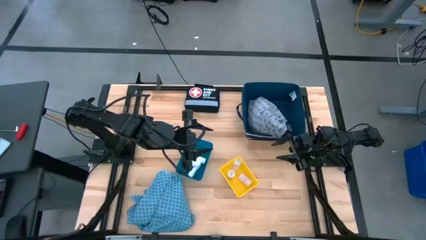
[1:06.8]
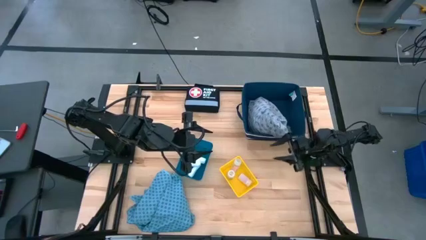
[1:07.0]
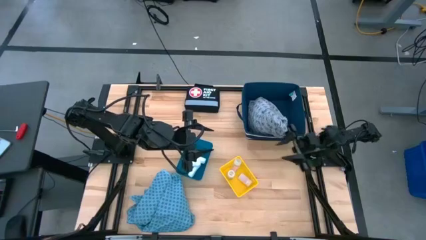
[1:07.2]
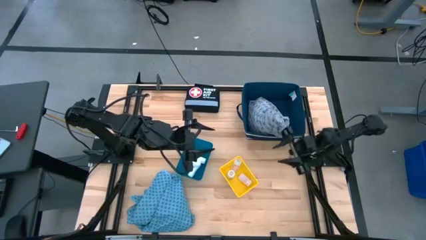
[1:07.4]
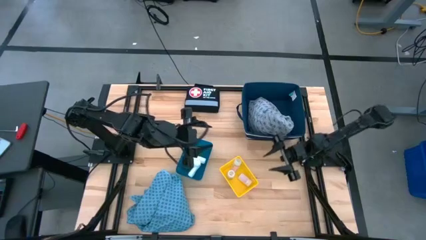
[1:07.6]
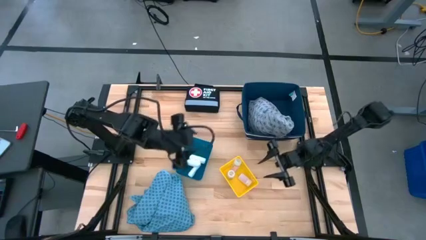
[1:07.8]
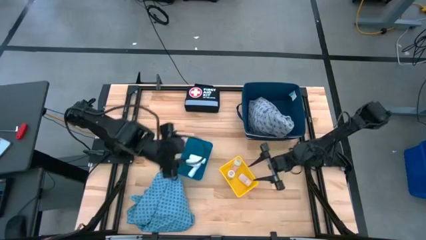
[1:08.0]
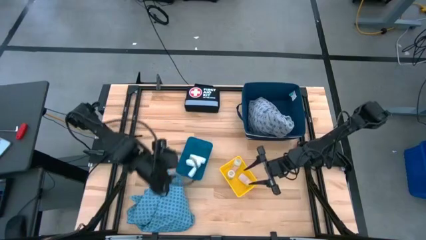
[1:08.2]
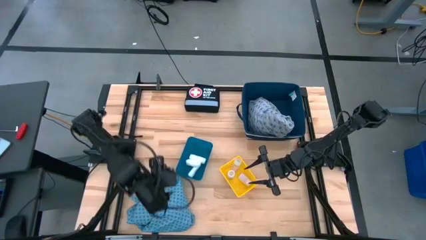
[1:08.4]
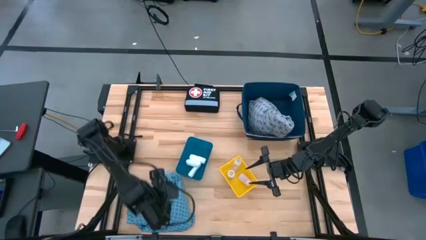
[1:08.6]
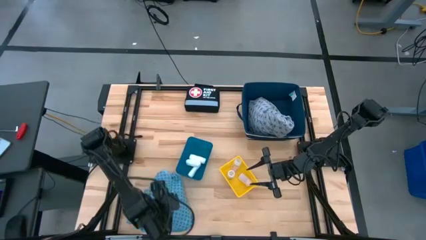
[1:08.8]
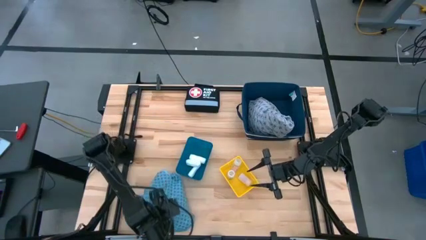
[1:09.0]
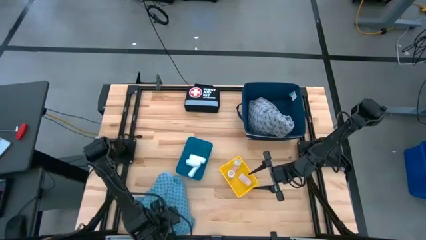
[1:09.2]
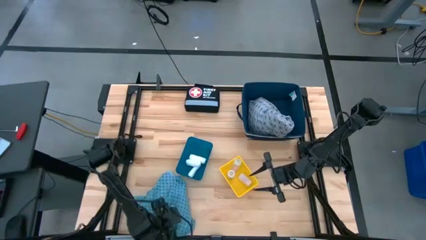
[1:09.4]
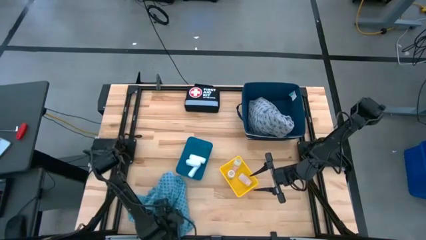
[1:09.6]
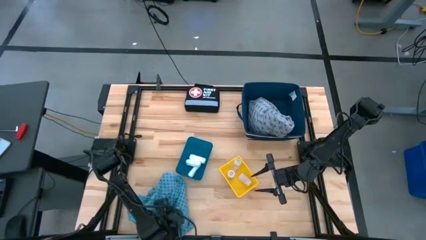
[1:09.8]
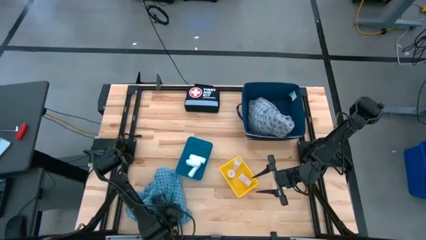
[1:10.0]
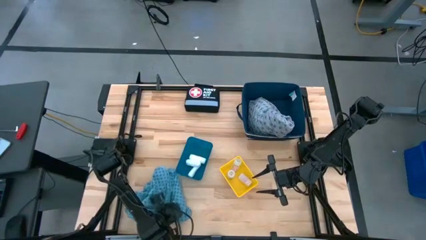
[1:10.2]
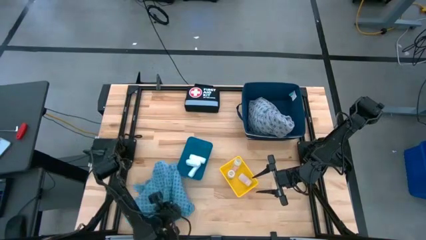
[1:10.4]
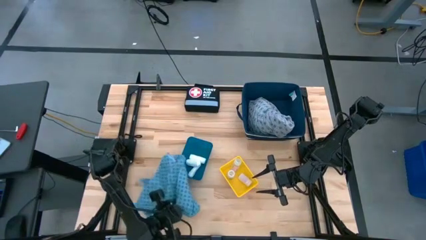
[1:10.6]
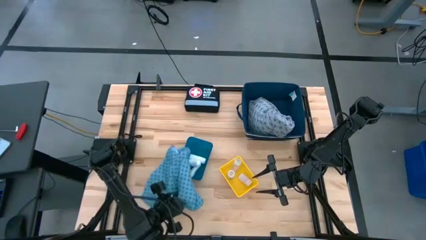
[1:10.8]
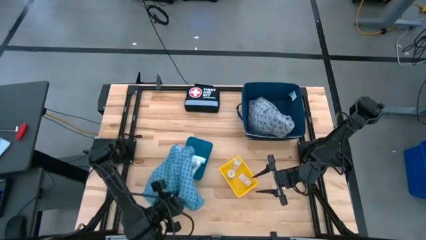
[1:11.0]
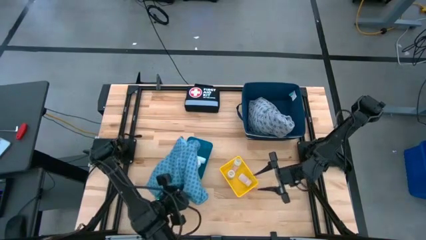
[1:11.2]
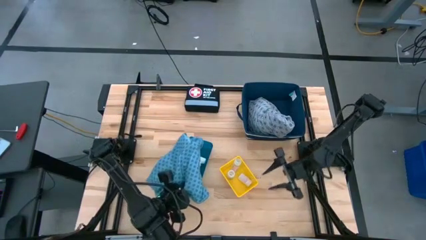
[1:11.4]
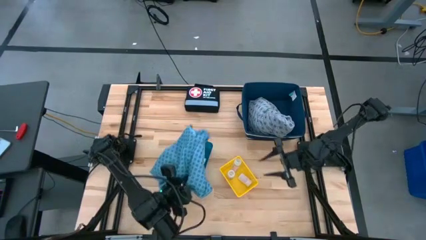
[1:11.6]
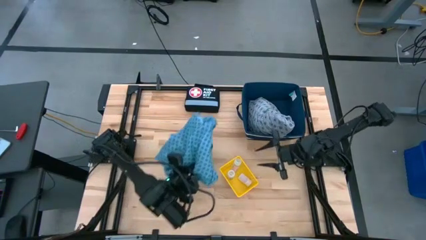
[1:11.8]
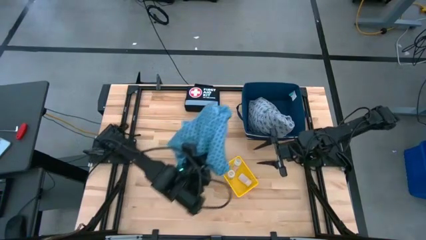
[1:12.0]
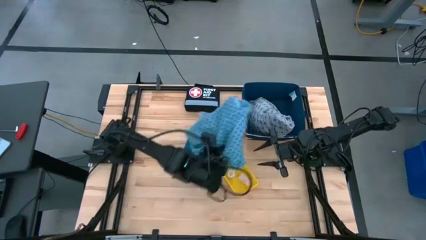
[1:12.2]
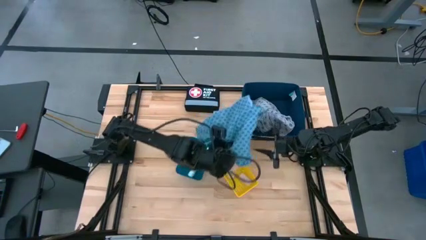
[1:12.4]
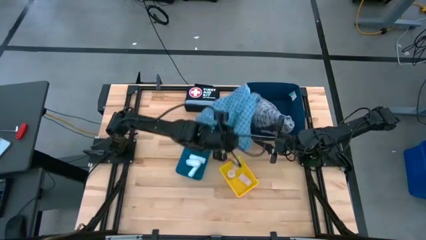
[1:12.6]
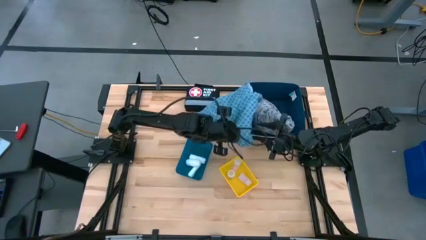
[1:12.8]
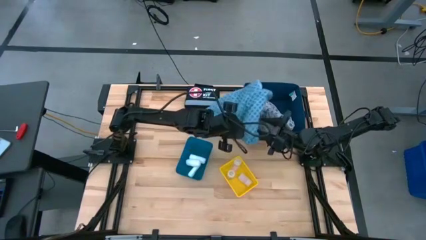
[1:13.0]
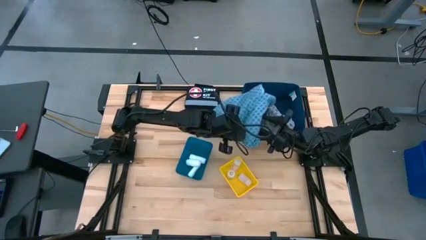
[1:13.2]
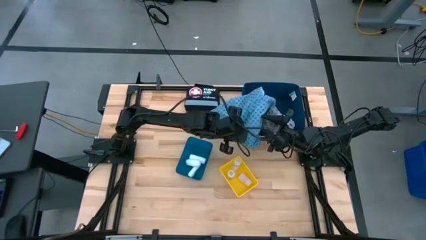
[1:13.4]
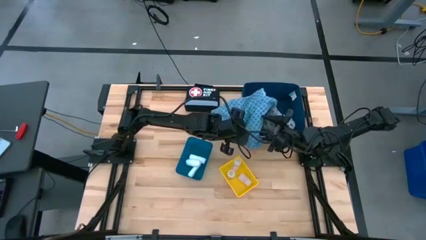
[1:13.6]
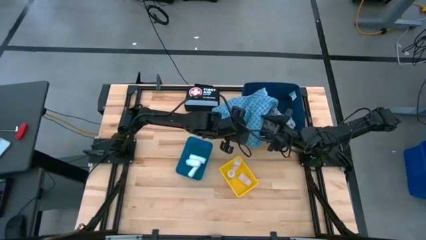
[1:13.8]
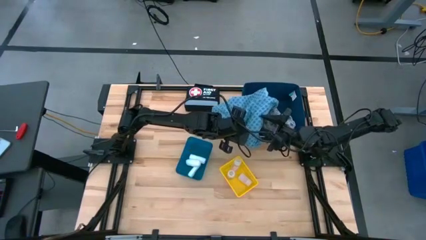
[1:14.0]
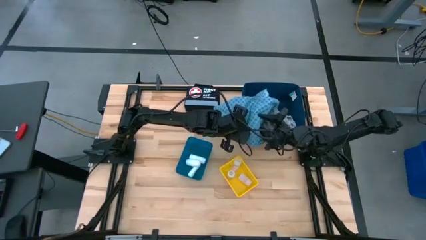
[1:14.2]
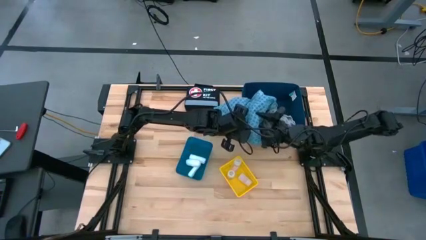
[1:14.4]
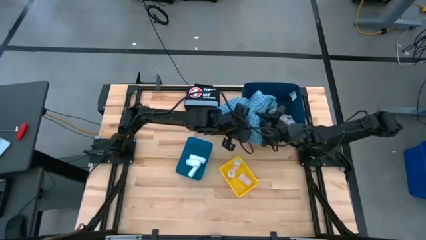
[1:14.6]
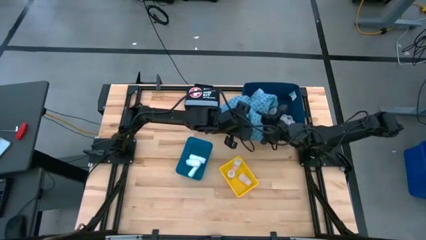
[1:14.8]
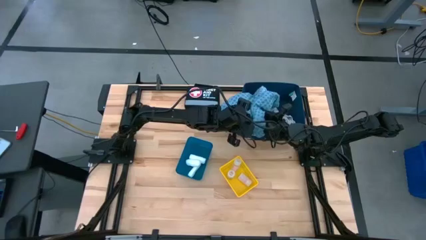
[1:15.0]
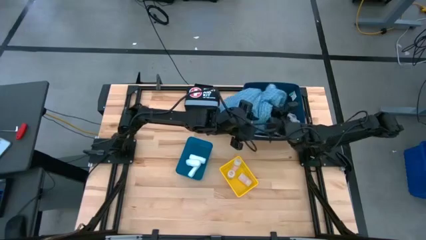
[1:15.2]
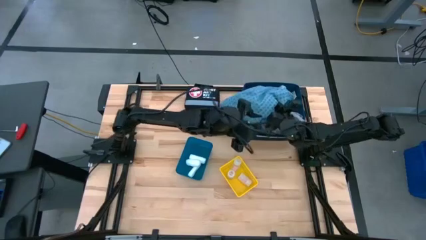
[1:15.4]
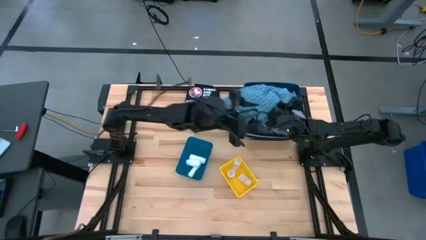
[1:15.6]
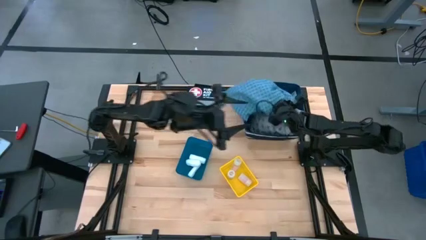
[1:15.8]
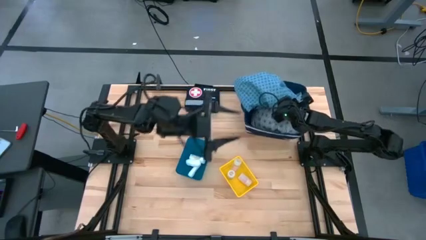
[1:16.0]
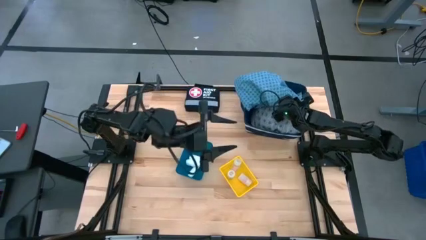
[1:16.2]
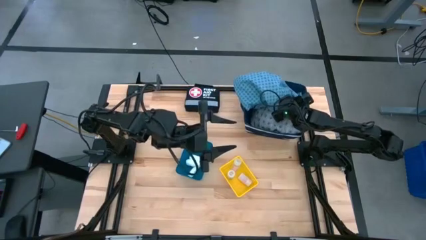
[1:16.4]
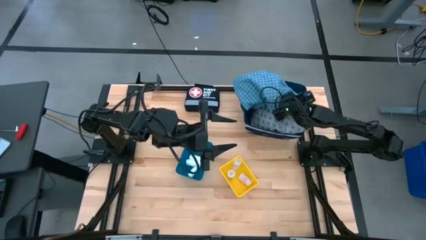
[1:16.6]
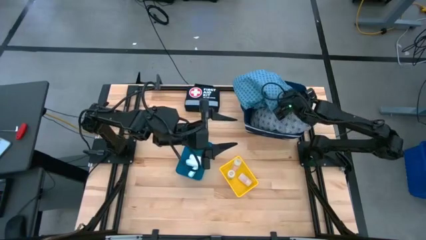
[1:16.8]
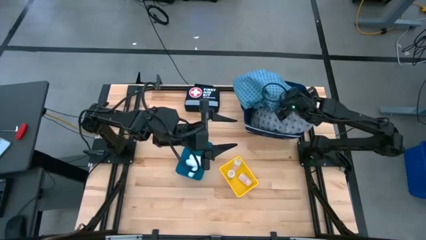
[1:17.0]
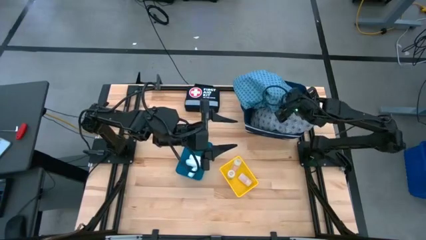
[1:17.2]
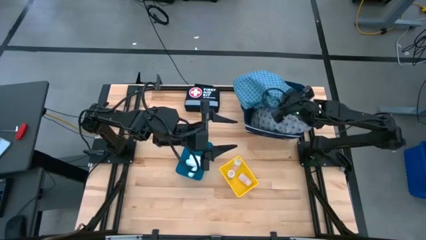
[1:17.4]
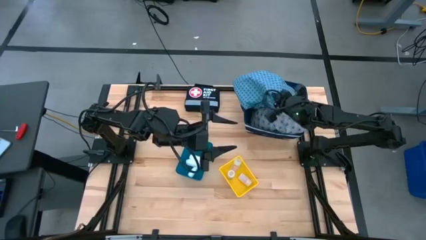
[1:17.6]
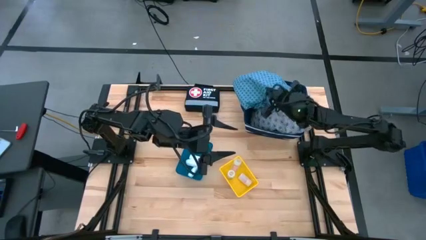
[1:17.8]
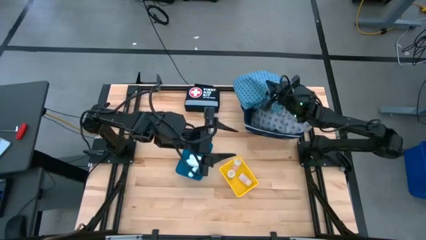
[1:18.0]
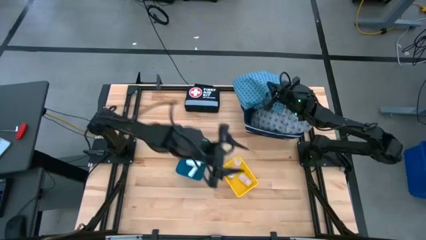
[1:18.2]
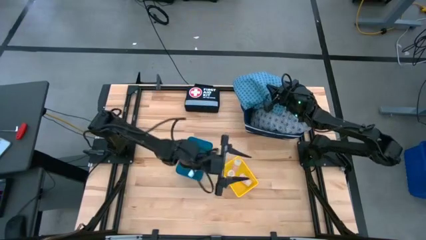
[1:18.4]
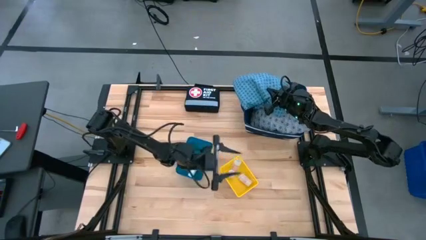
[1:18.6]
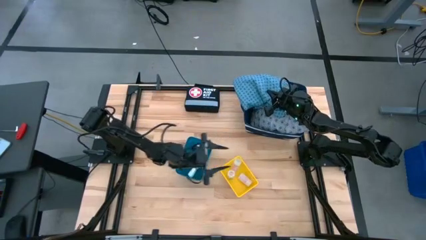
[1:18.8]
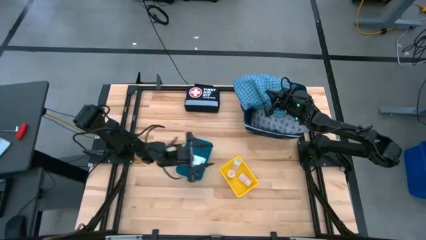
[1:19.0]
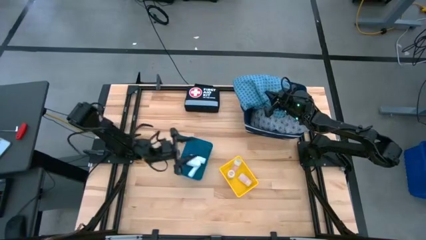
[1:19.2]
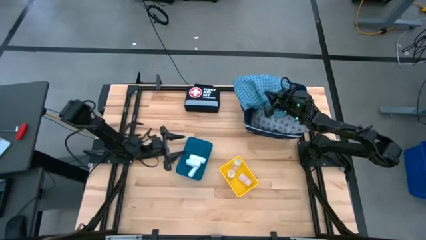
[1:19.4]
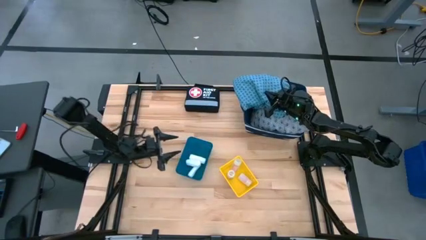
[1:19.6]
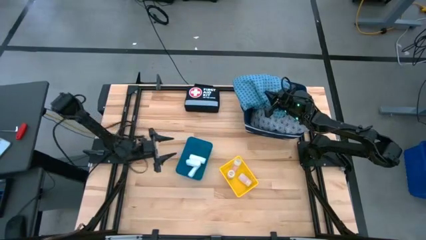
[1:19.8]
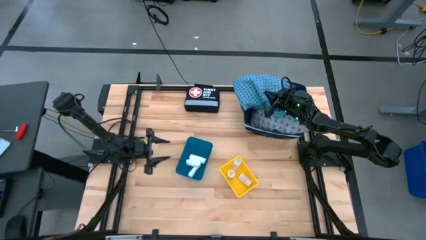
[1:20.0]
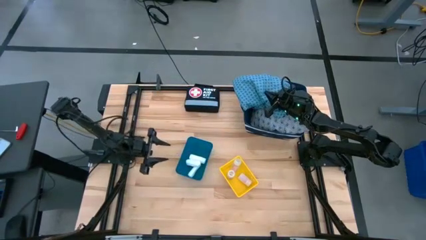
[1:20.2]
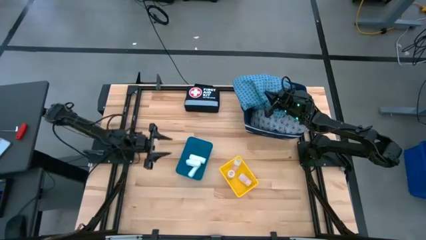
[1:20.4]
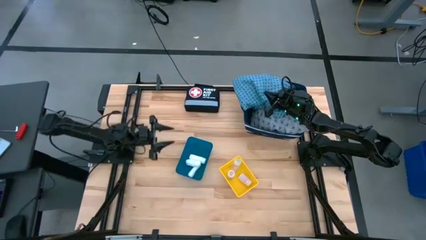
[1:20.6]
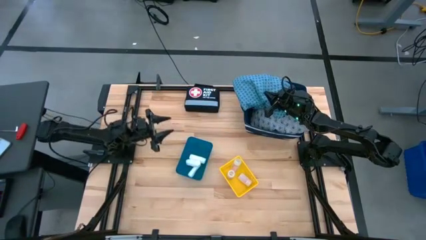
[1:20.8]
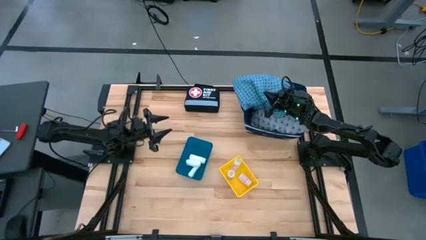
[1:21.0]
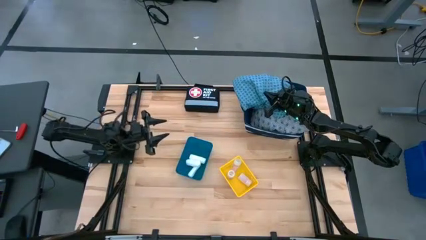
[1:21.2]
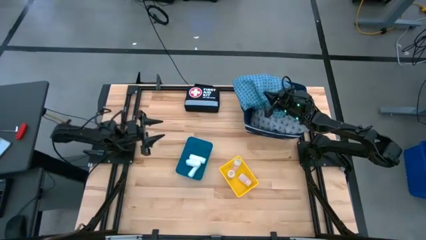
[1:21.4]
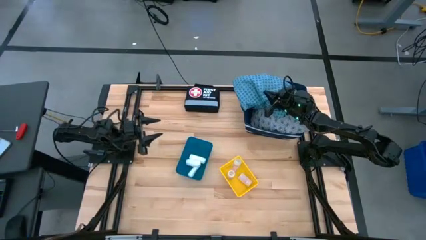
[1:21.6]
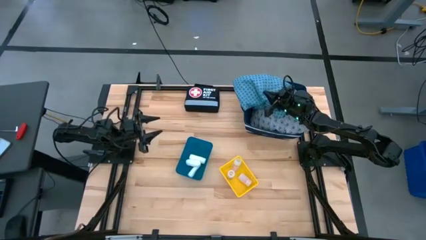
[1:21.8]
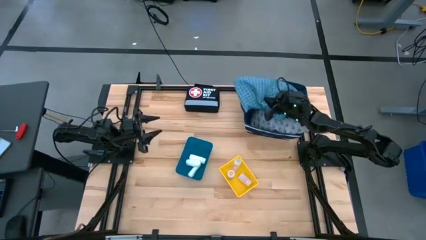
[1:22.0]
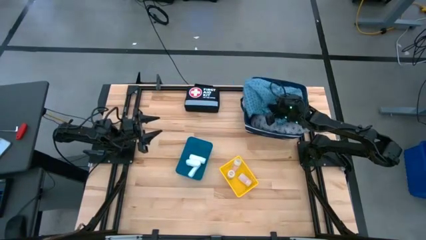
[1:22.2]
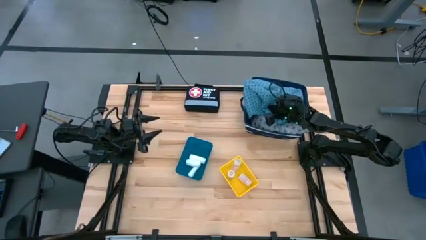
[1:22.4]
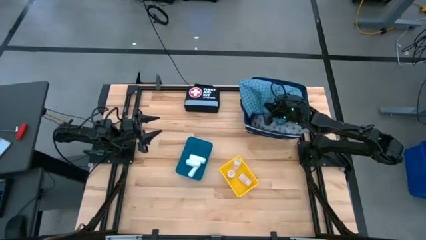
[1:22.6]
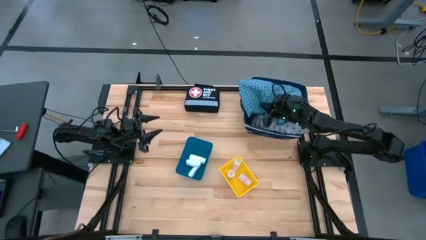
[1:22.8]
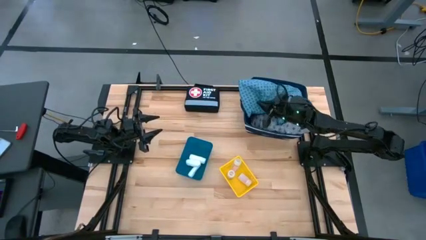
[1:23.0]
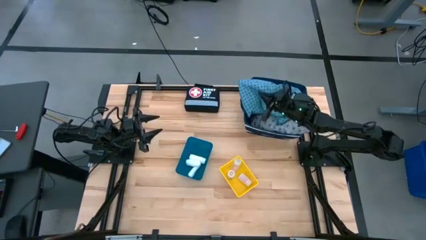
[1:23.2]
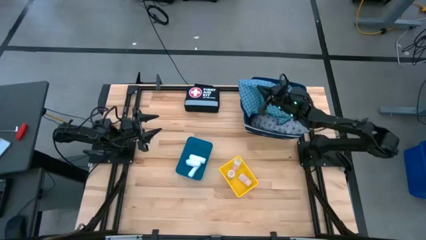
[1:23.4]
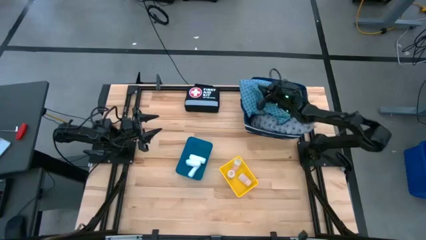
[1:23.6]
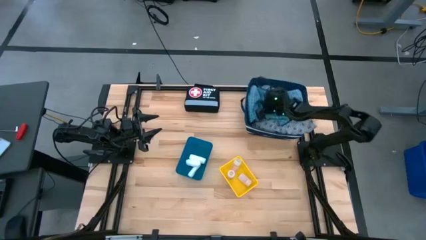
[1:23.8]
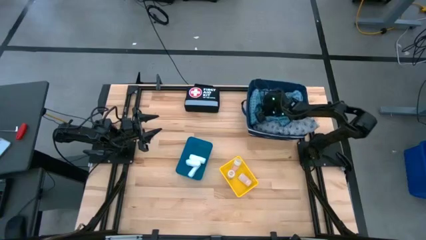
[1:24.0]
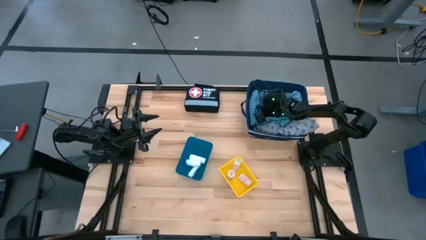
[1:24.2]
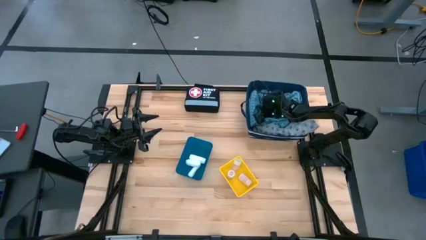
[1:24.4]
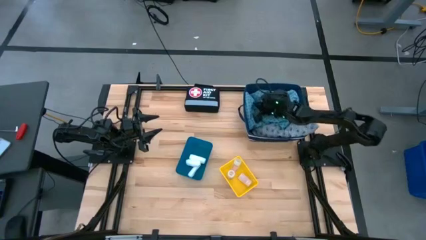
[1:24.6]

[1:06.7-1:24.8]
Task: Pick & place medical supplies in basket/bin
Put the blue patient gown into the blue laundry bin
